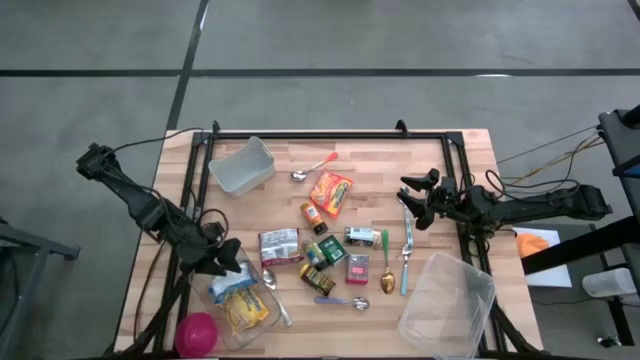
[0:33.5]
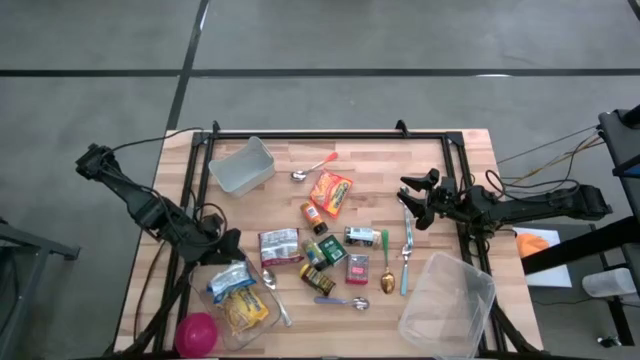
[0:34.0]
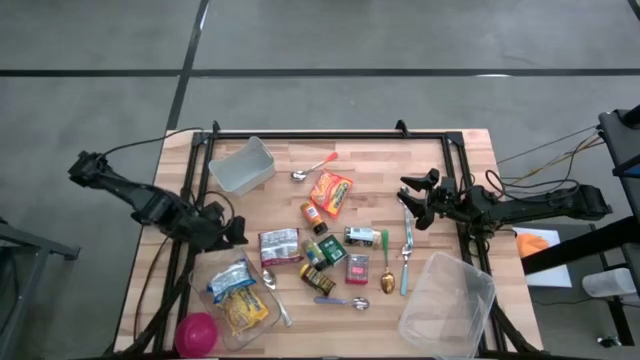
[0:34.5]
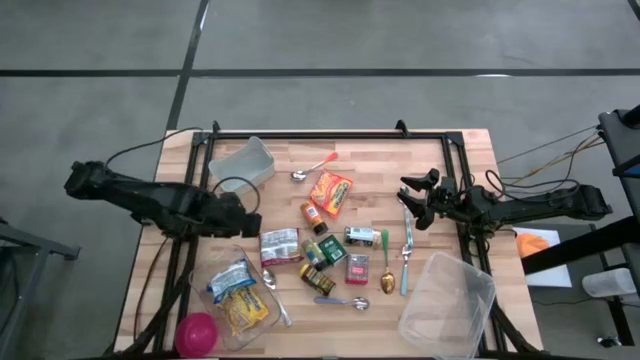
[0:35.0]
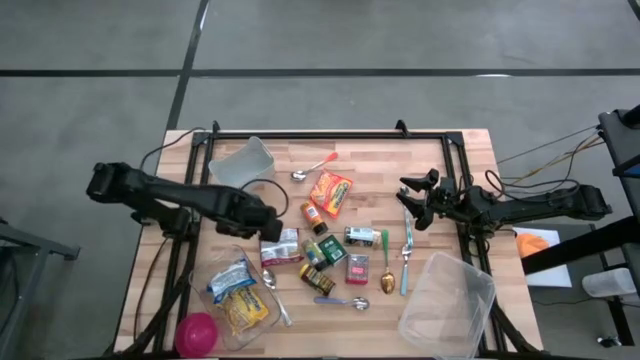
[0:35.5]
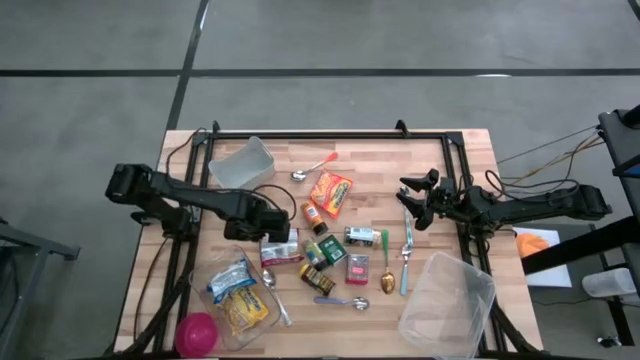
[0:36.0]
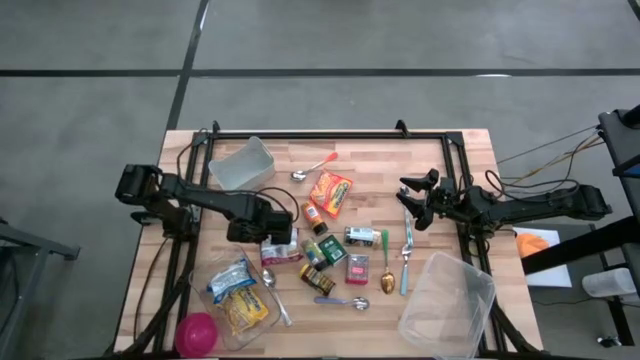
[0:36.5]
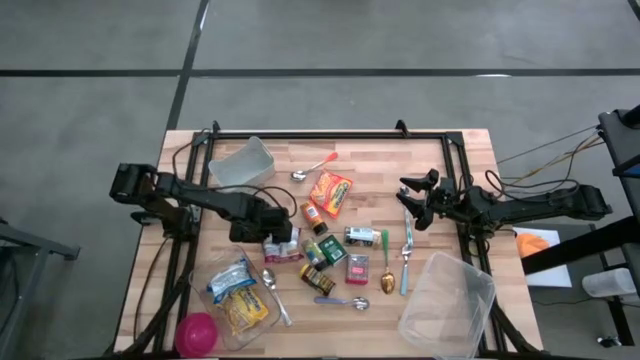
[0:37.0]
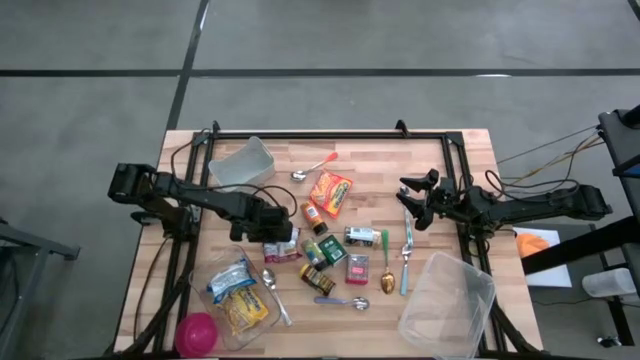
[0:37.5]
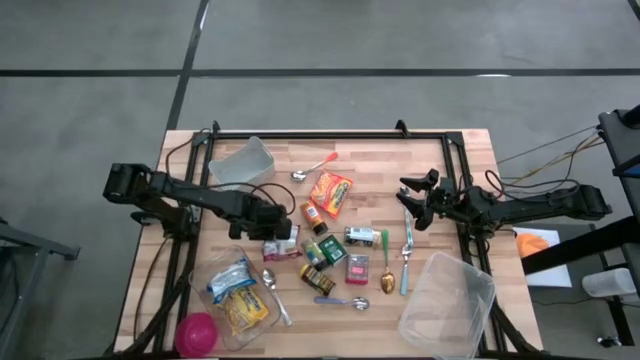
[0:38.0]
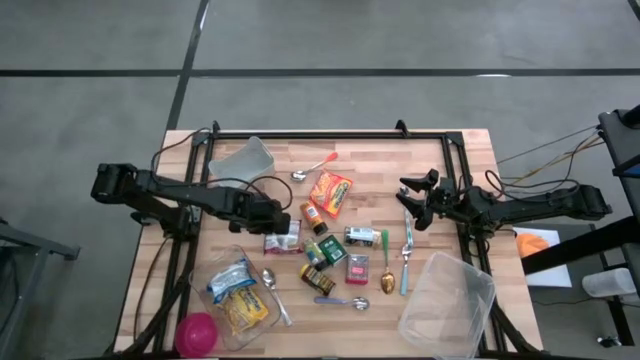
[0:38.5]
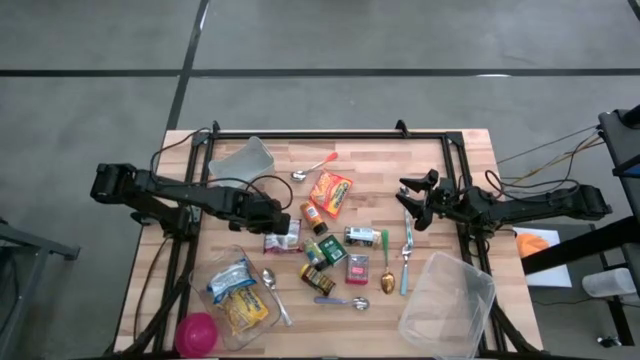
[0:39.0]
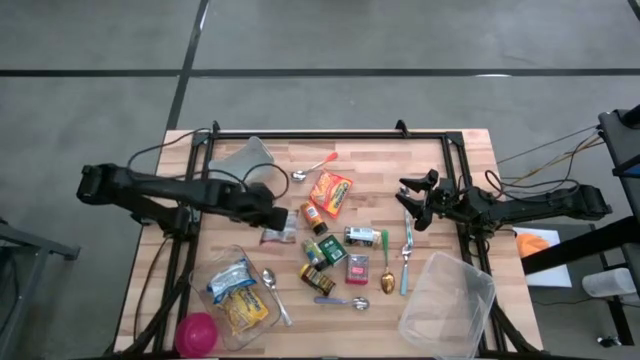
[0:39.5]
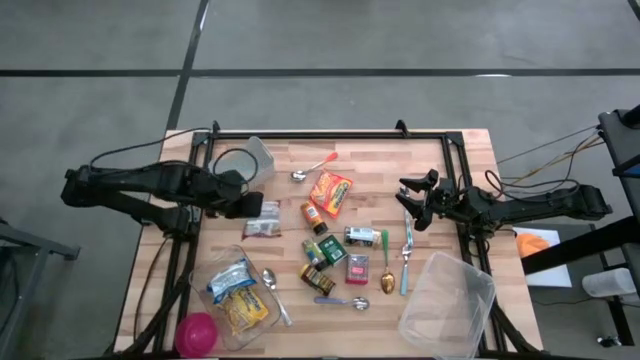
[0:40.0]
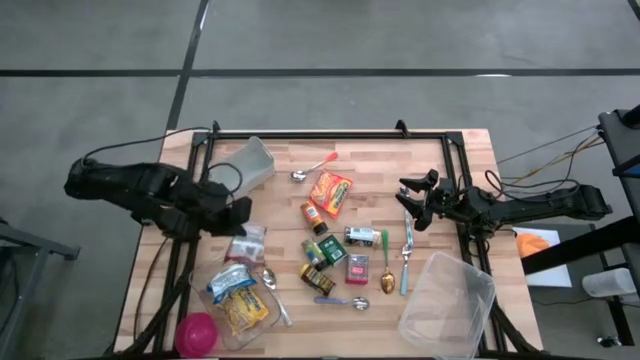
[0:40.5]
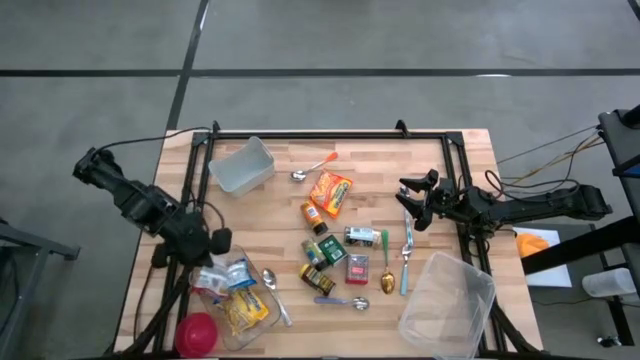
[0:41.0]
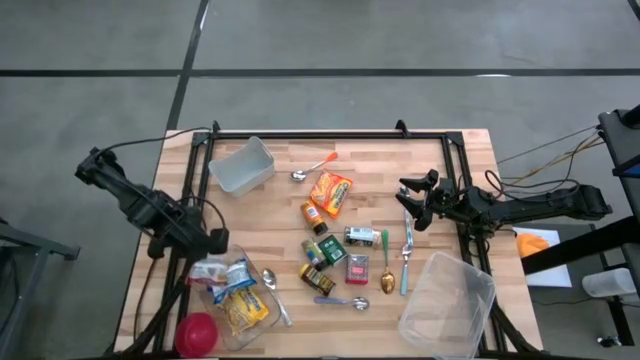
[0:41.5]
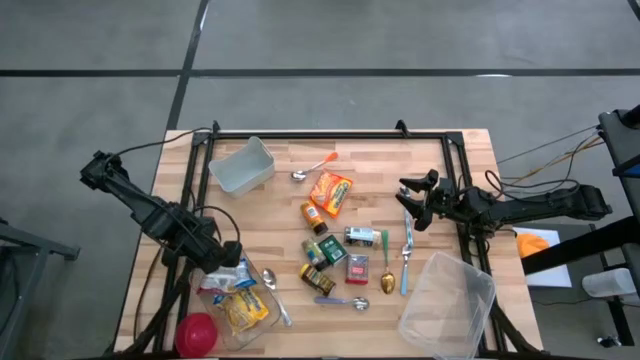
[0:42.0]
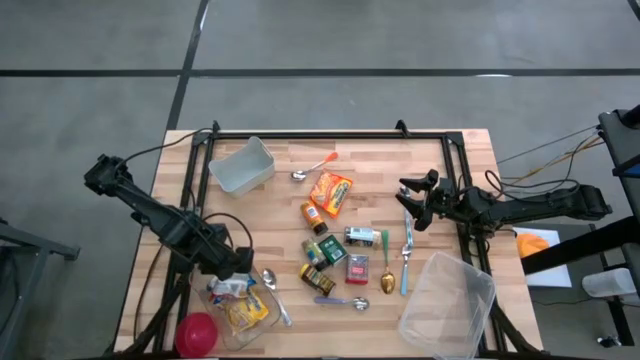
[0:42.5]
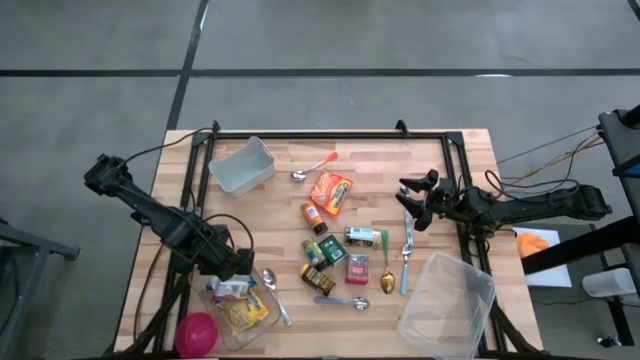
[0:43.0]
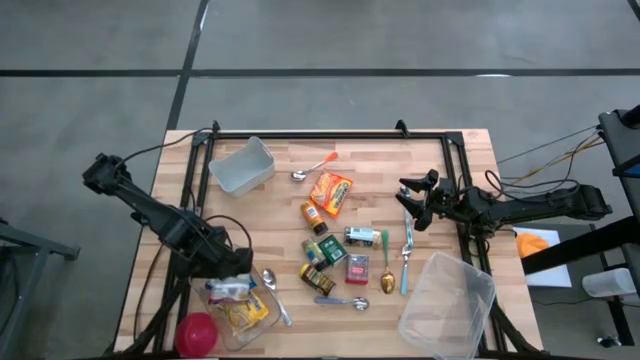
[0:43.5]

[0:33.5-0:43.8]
Put the red noodle pack into the transparent bin

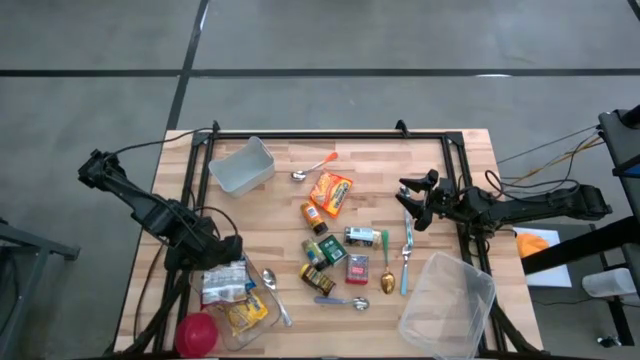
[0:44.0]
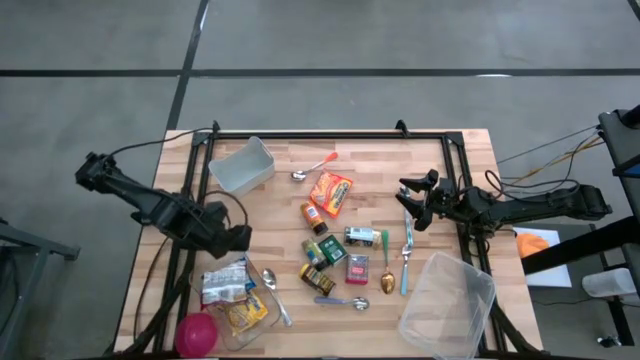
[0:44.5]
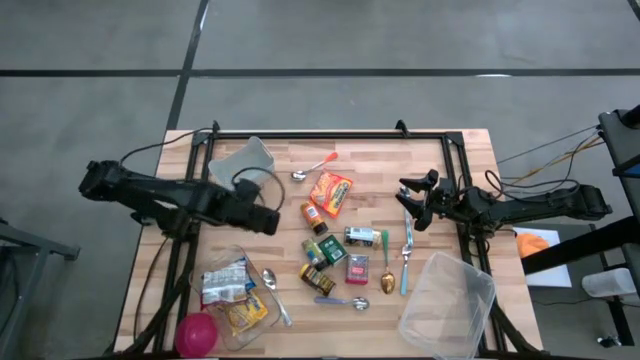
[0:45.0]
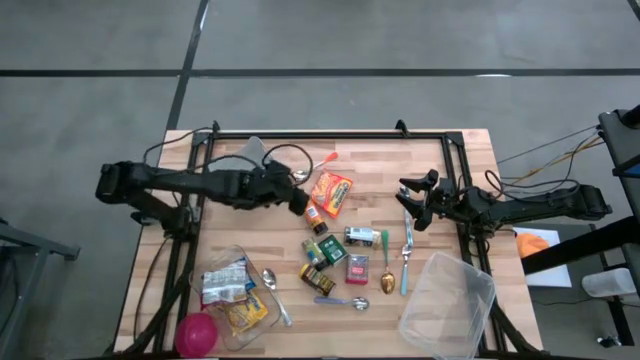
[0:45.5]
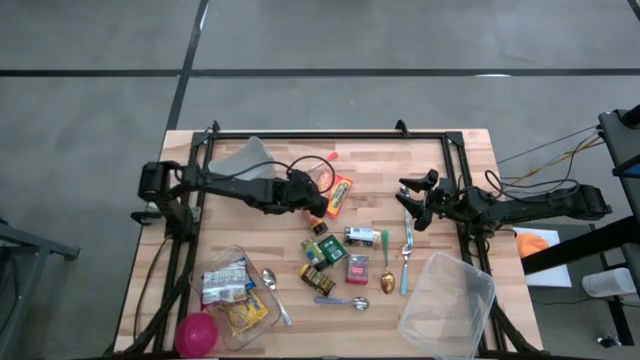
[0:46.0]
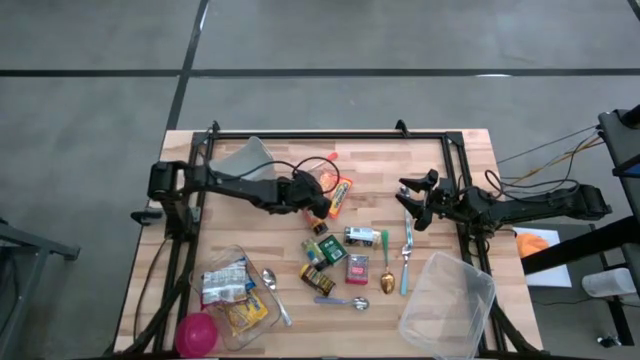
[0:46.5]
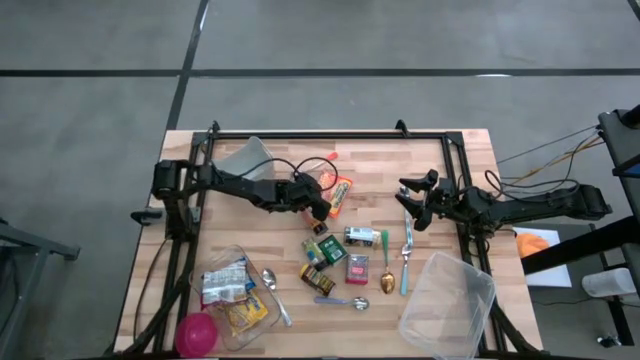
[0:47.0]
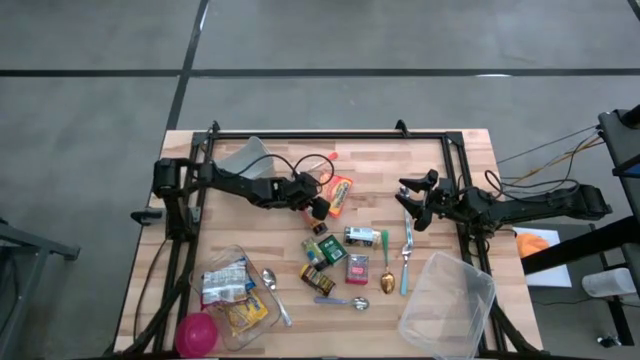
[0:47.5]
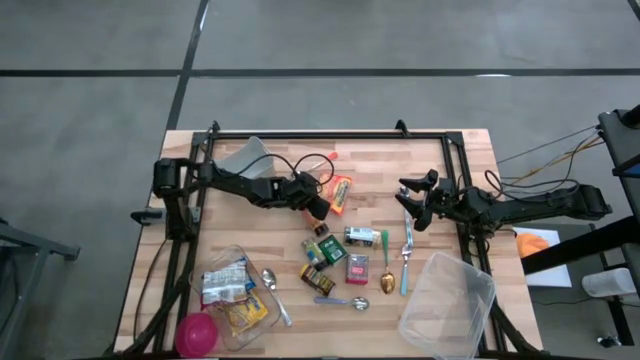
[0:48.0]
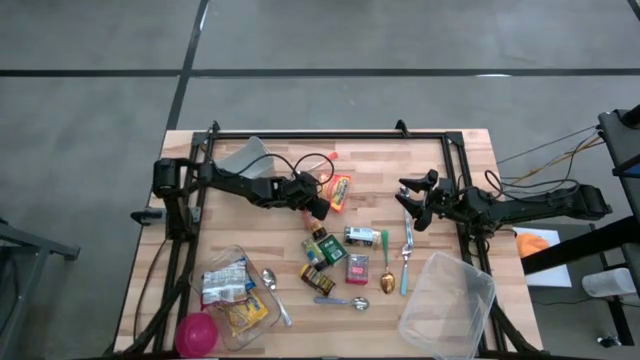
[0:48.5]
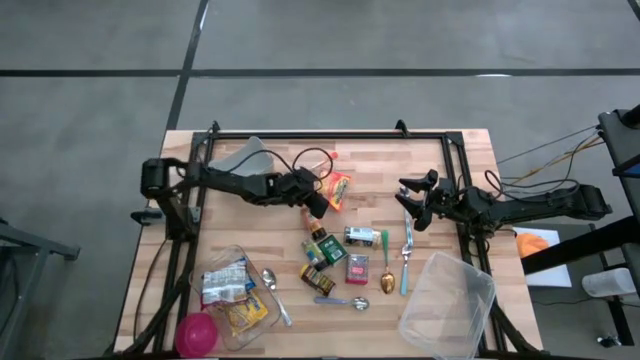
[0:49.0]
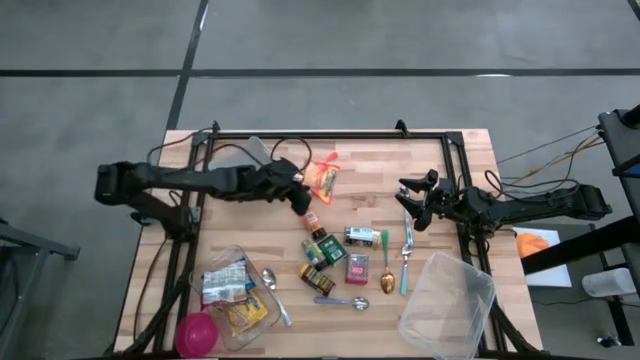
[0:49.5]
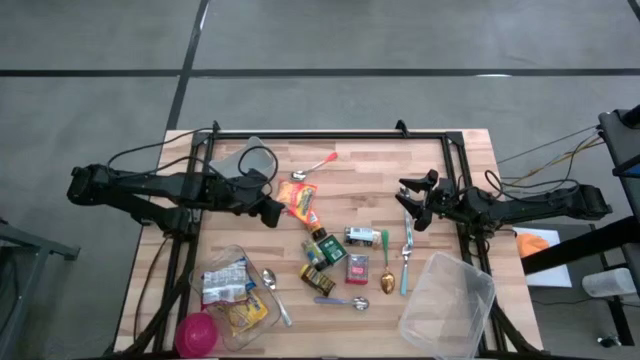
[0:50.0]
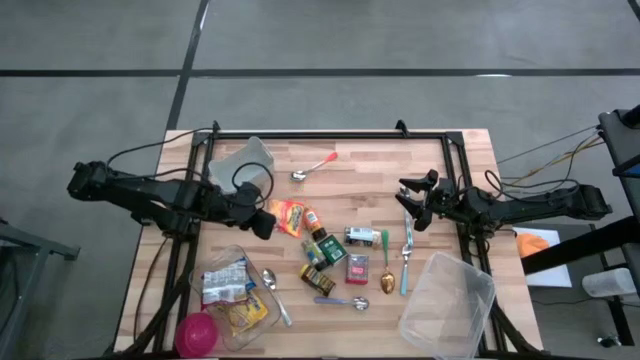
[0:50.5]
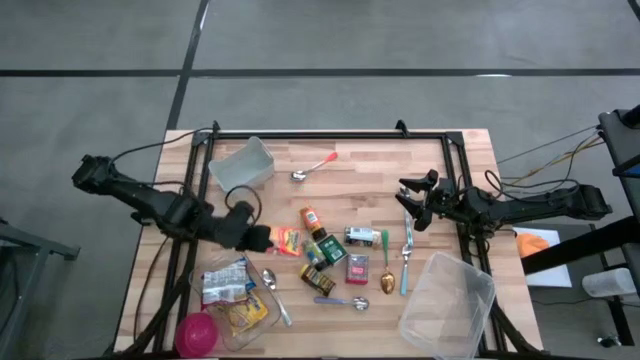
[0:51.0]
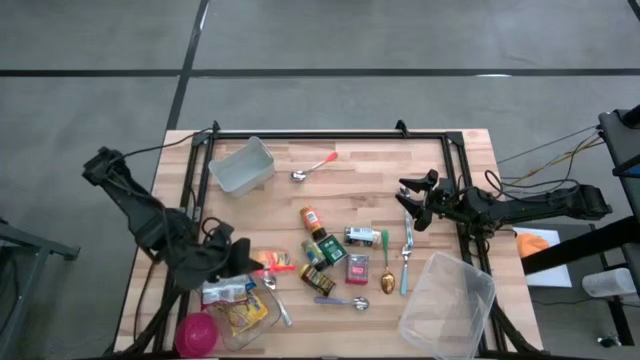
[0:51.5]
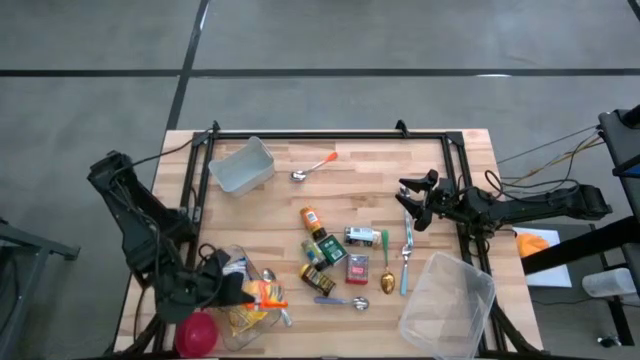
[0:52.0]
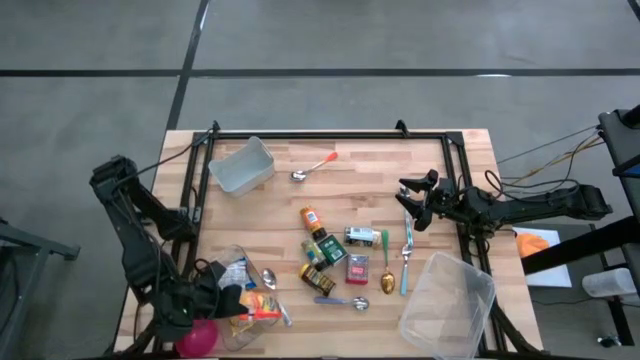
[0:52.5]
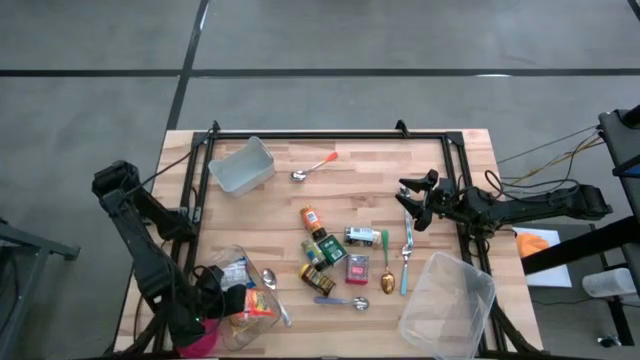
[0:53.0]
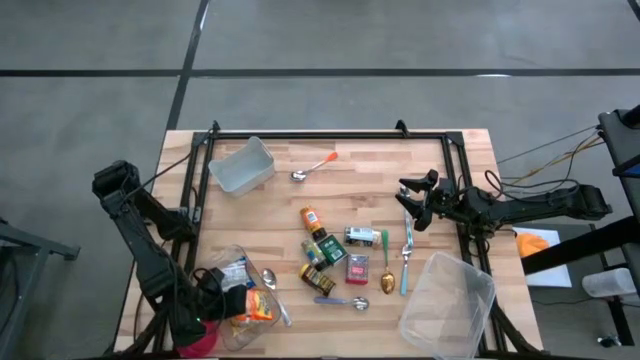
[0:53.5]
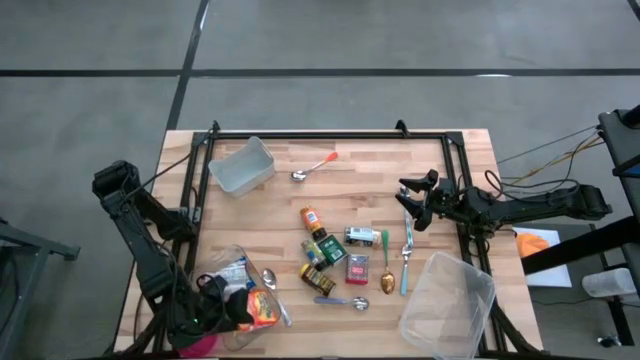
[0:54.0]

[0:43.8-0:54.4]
Put the orange noodle pack into the transparent bin
